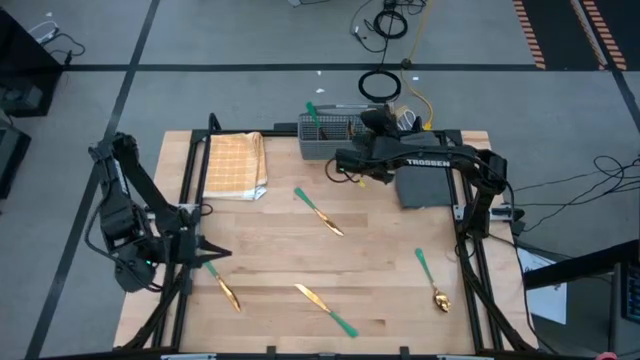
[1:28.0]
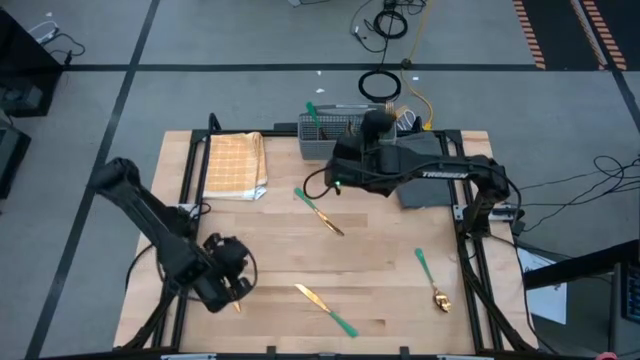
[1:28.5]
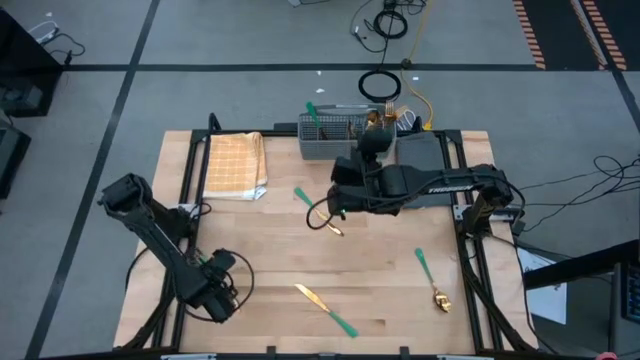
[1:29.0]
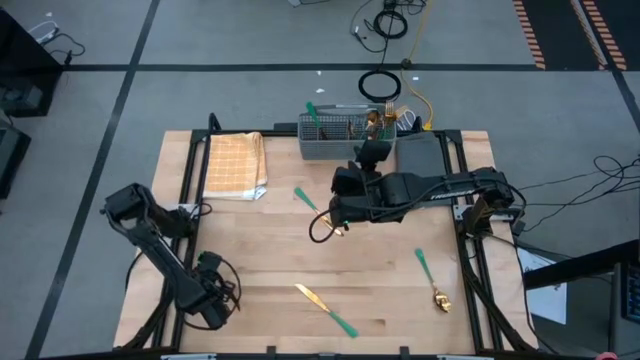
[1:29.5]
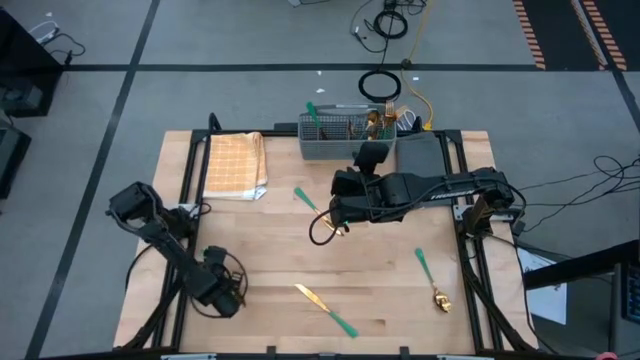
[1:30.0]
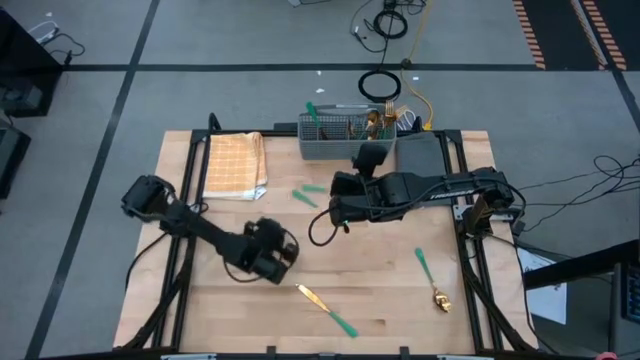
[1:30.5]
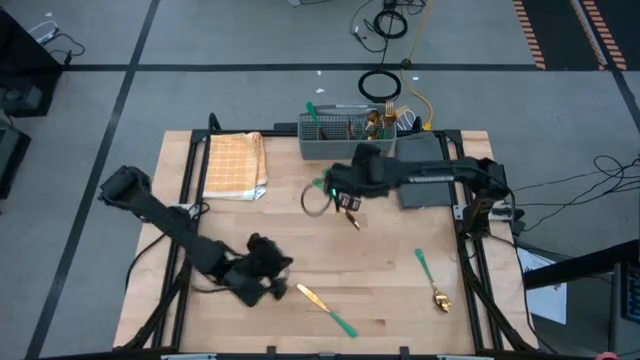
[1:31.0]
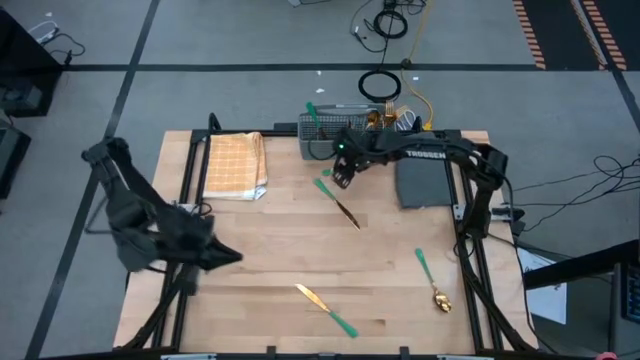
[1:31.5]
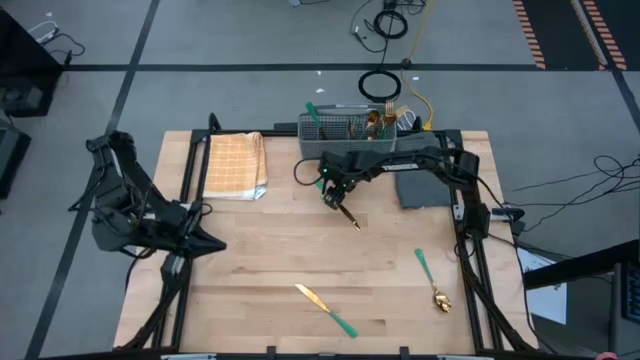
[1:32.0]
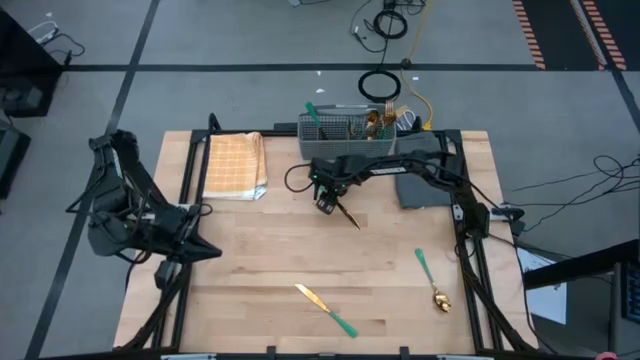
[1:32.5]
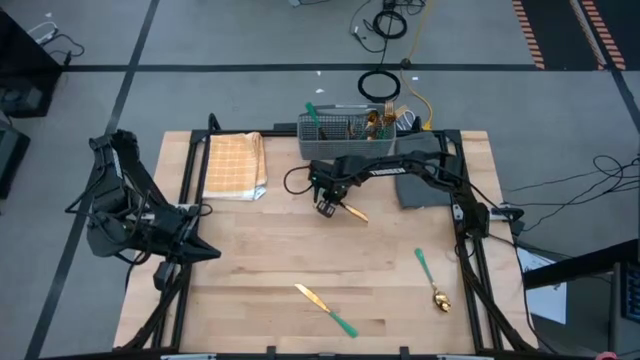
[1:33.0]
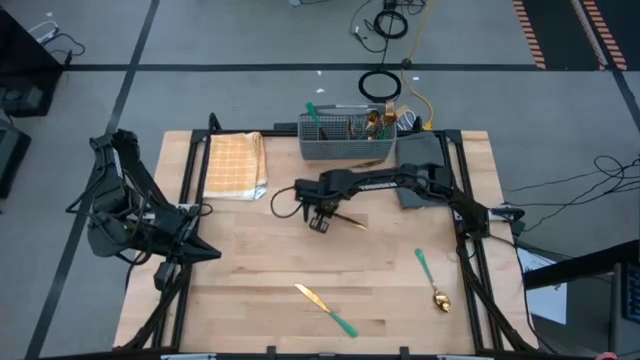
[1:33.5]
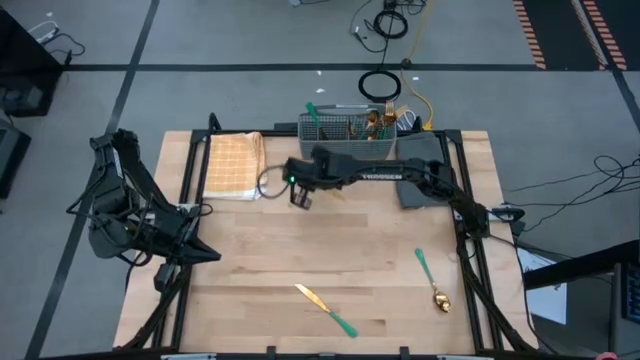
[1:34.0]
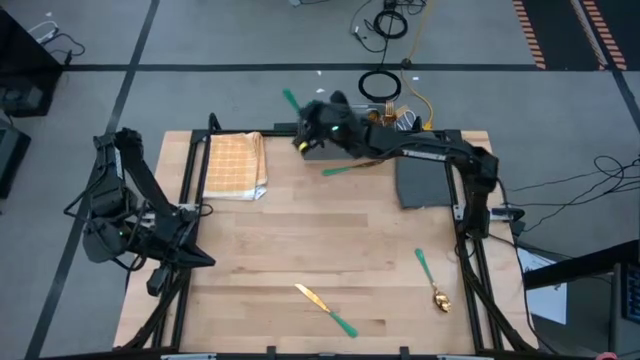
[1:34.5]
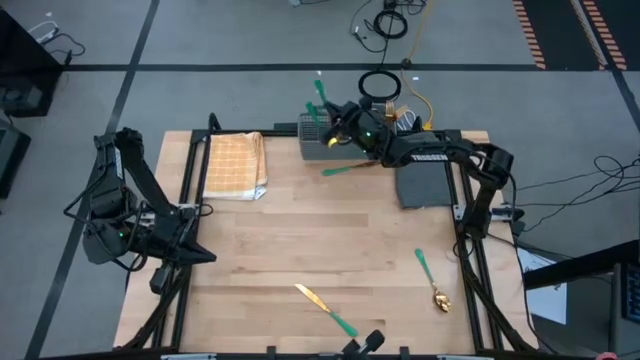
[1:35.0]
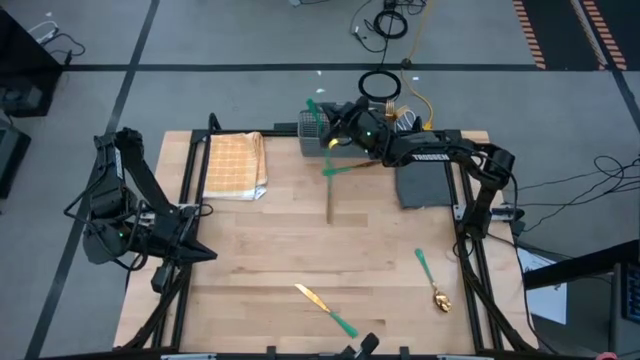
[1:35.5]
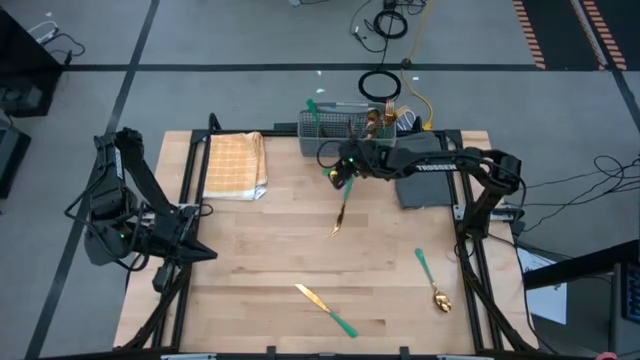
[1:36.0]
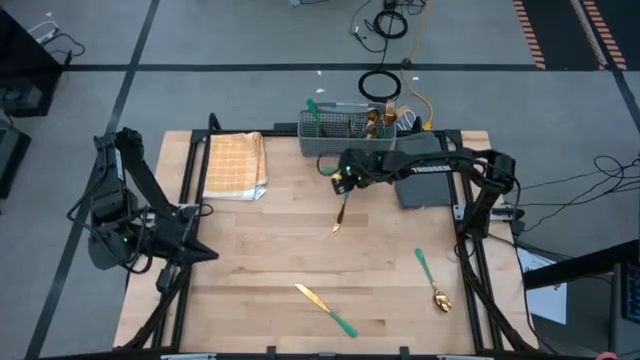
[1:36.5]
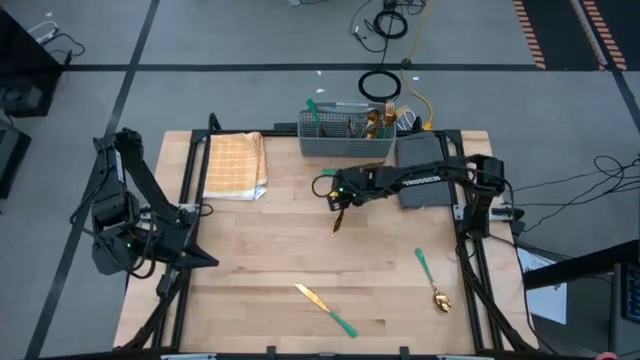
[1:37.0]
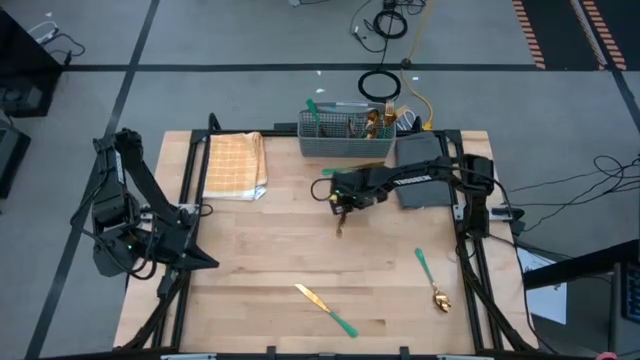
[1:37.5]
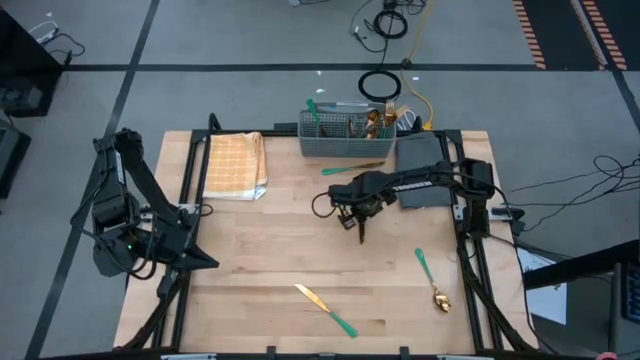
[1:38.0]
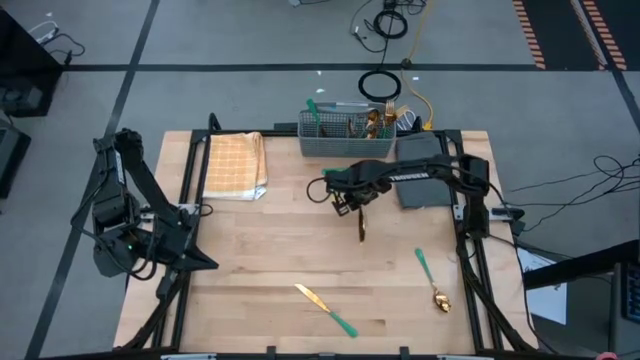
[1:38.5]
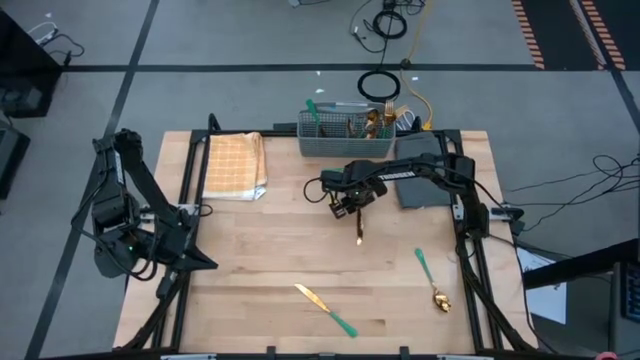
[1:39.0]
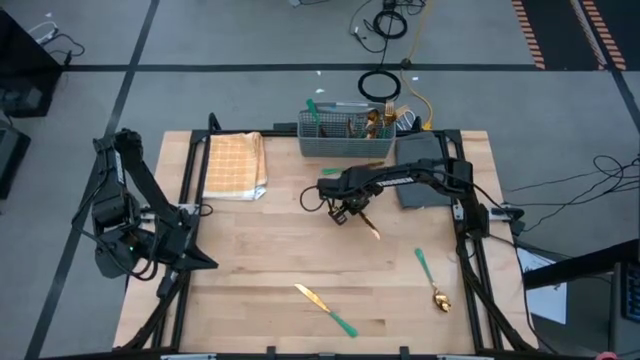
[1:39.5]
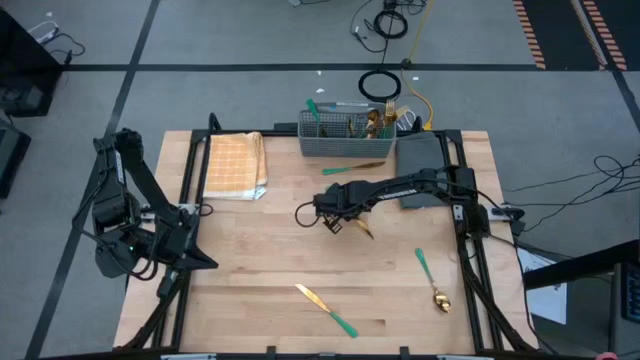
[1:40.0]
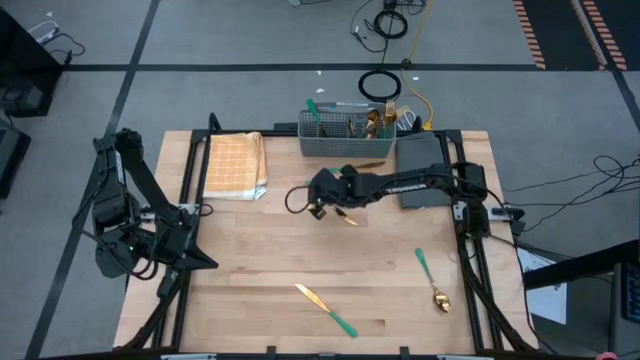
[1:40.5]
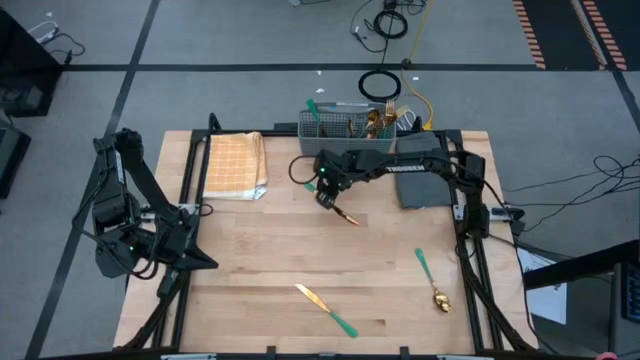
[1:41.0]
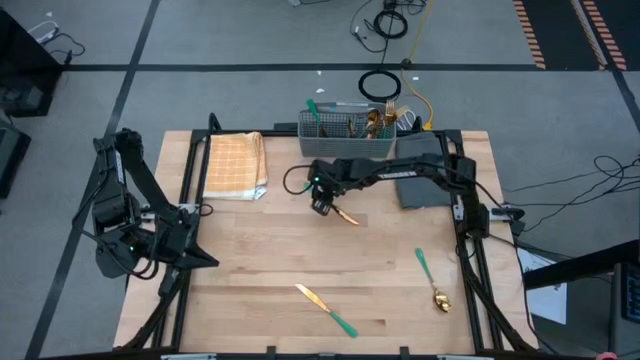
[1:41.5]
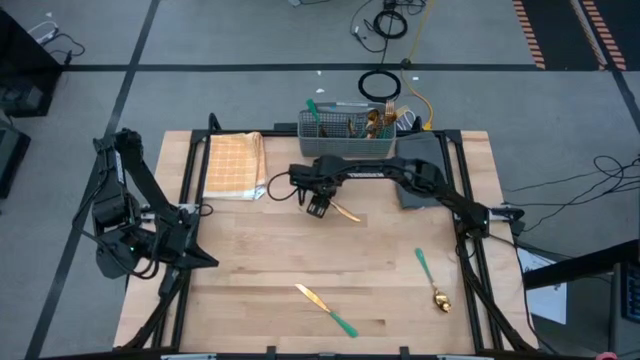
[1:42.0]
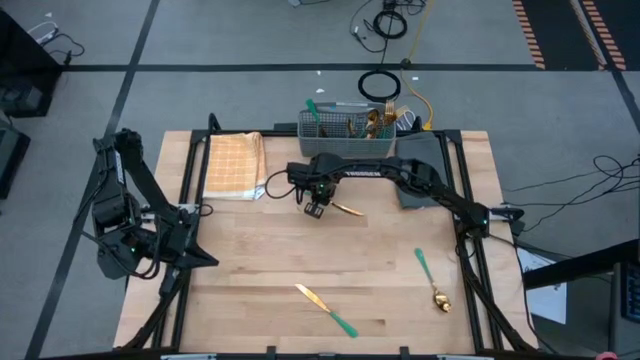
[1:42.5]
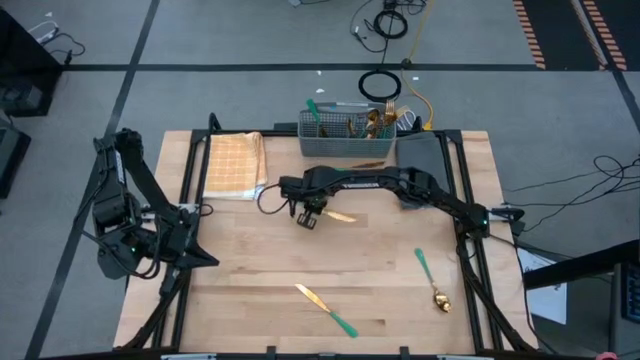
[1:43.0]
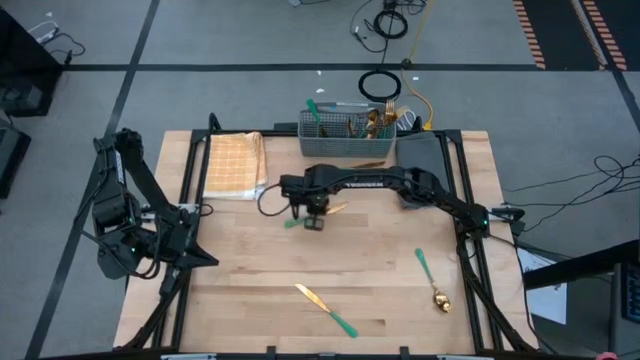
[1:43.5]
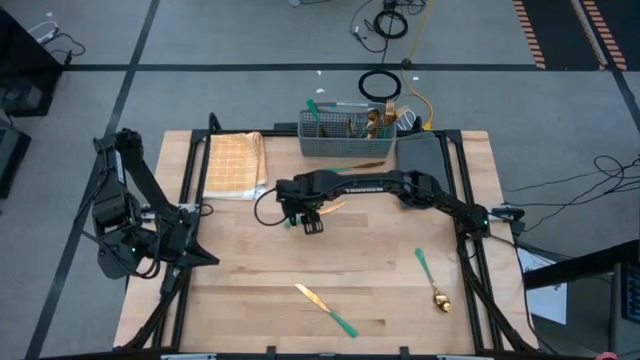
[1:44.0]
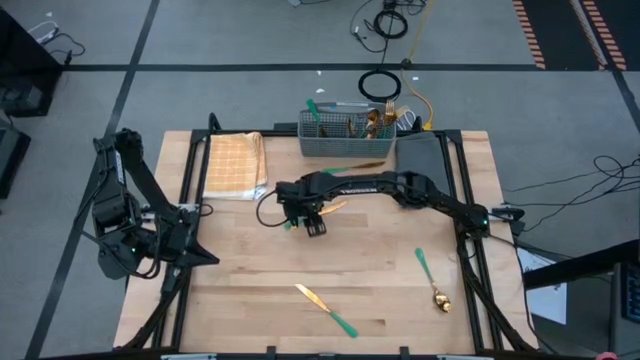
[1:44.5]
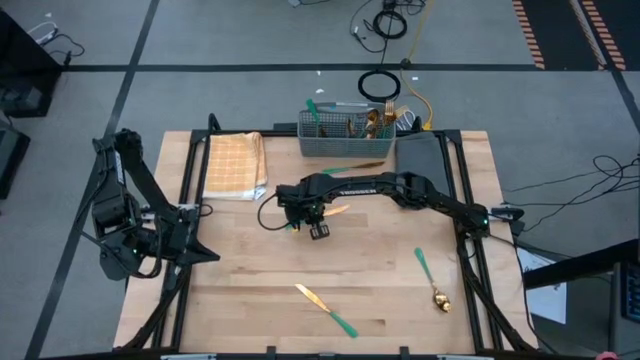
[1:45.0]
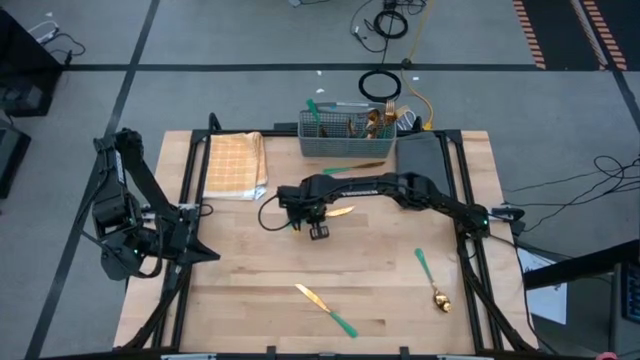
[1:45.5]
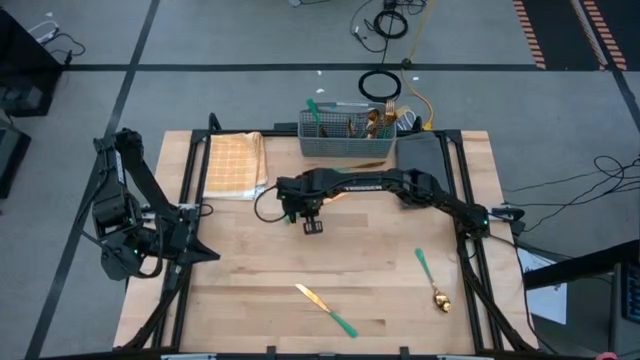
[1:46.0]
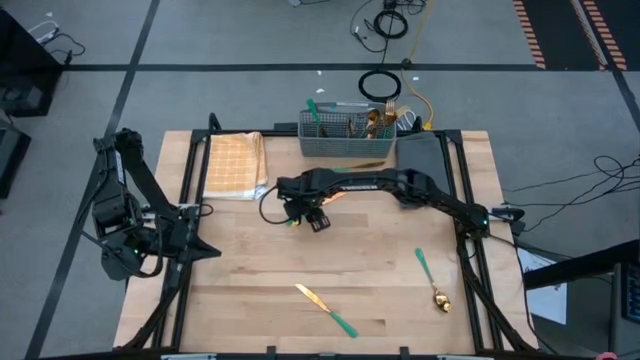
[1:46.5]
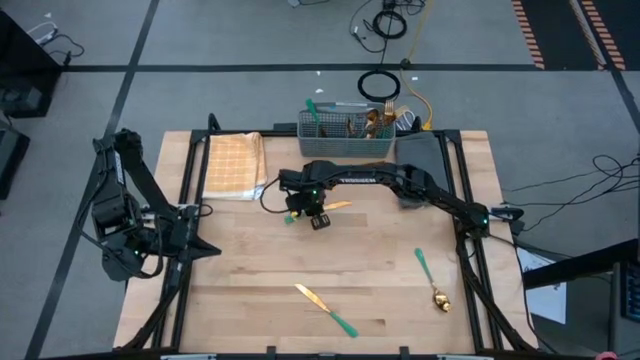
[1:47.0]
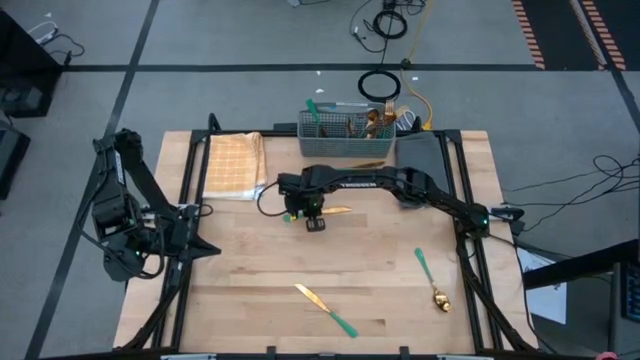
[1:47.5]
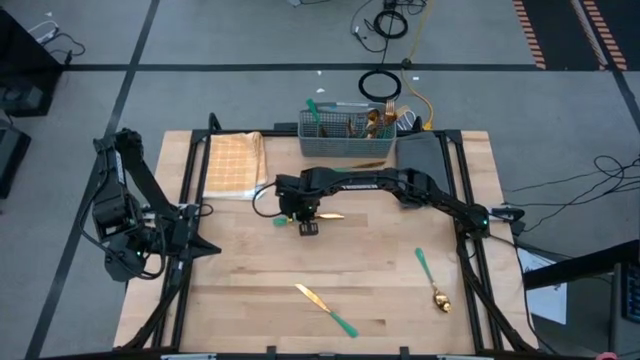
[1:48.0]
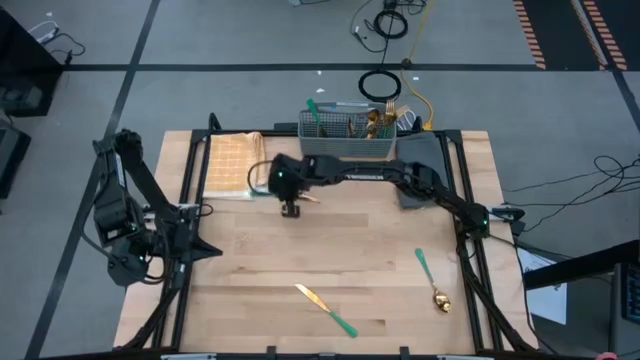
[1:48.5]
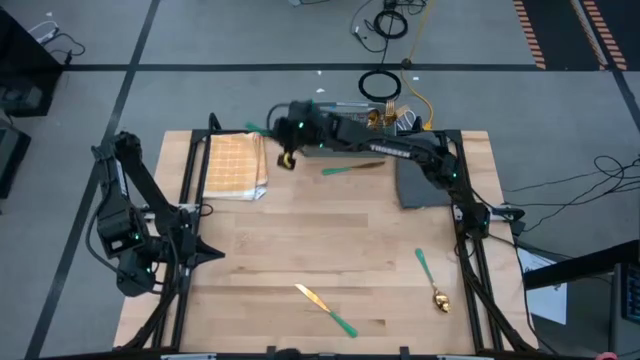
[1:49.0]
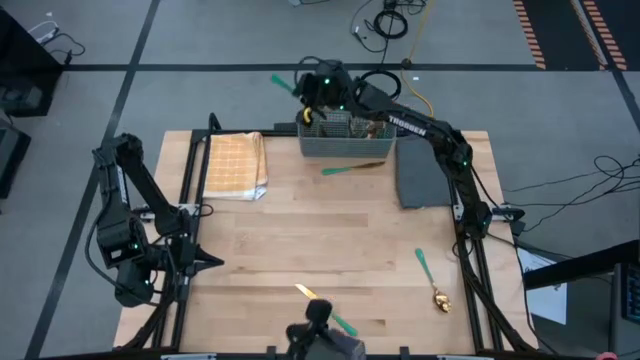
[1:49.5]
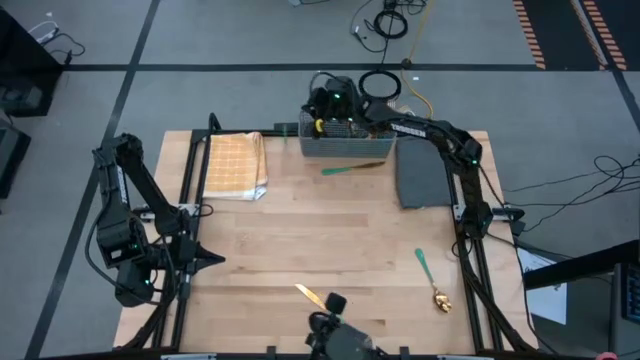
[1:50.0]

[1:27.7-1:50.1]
Task: Sort silverware
Put the knife into the middle left section of the dish rack
